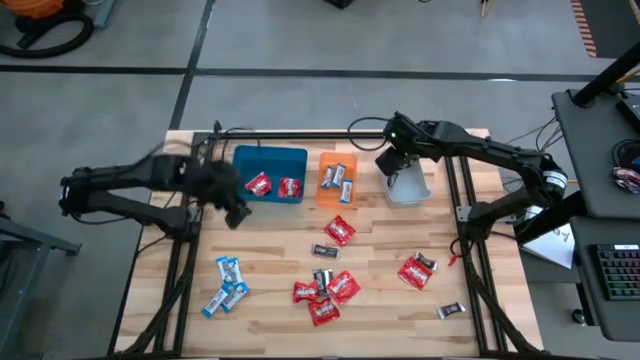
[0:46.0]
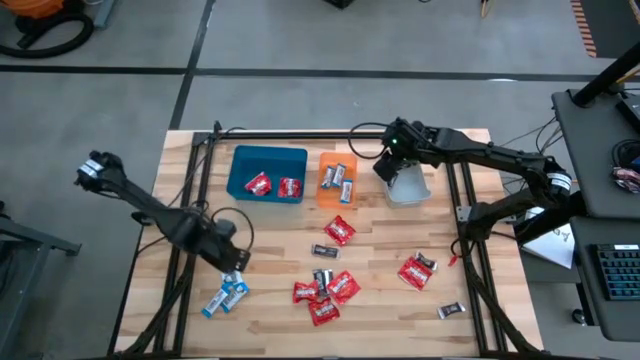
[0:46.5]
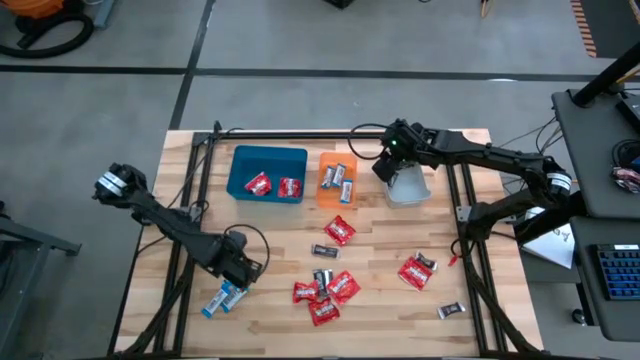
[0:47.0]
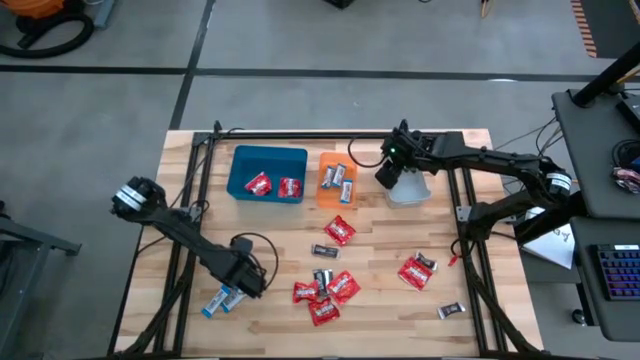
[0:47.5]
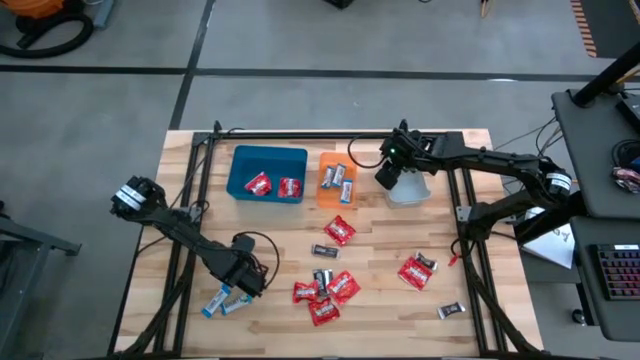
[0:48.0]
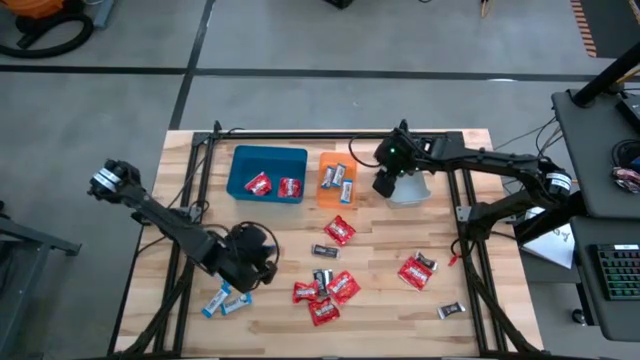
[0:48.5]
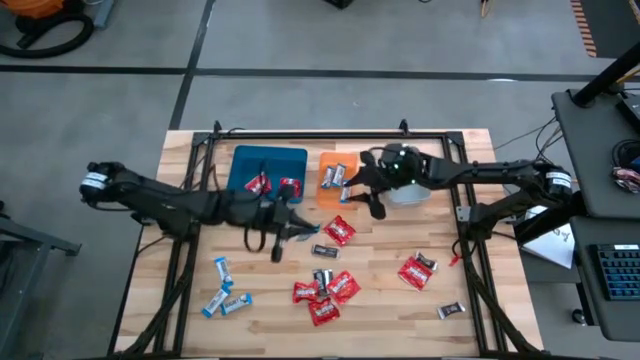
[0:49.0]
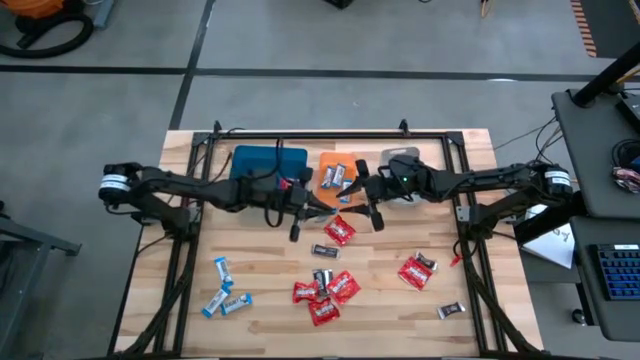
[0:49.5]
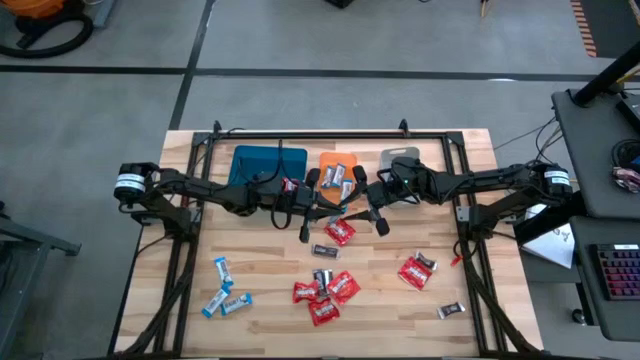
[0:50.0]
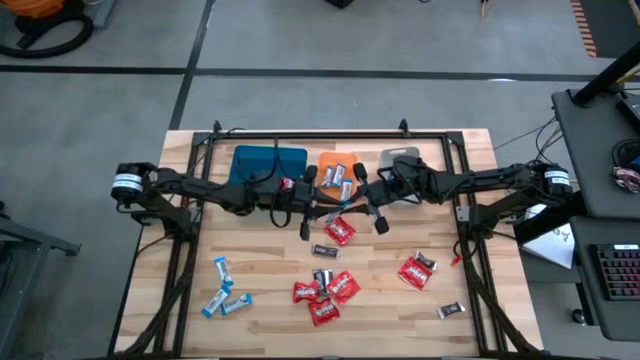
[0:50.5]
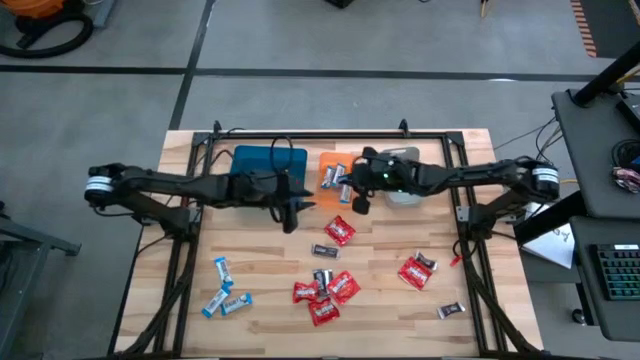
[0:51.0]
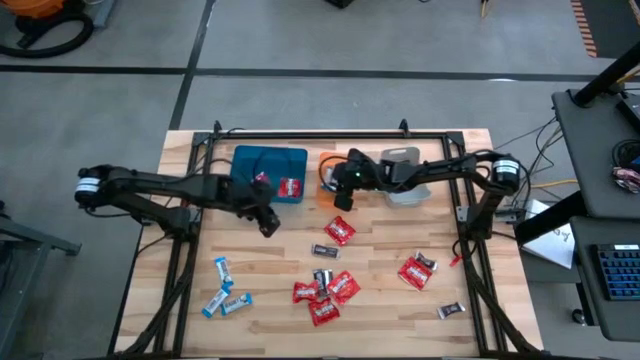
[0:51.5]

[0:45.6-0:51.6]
Task: Sort candy
Put the white chocolate bar into the orange bin

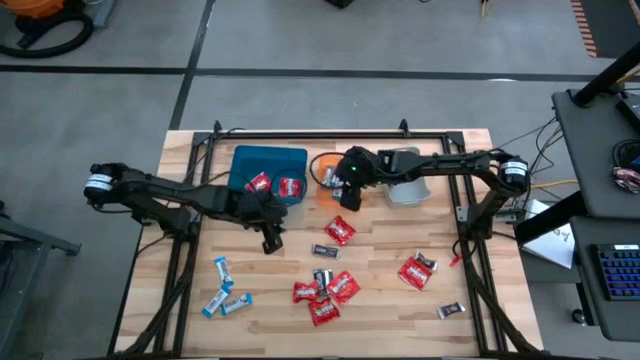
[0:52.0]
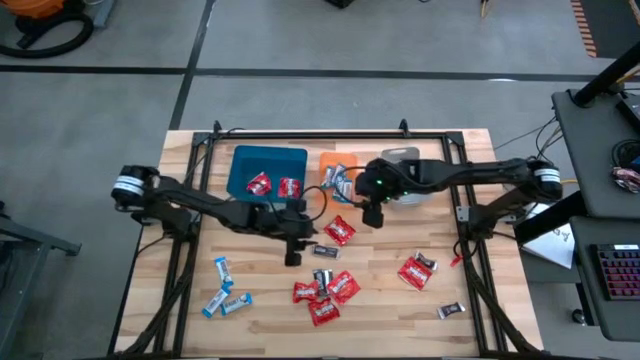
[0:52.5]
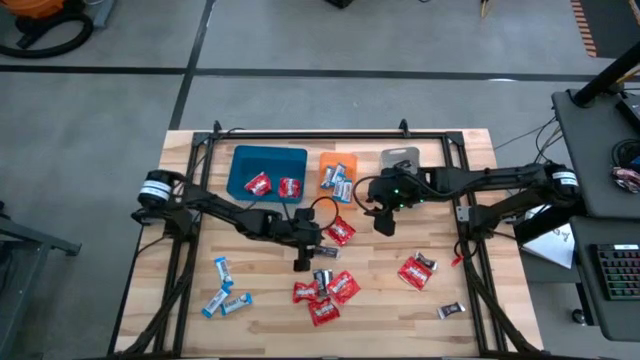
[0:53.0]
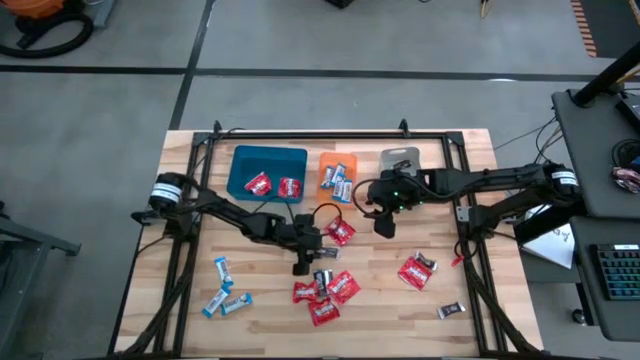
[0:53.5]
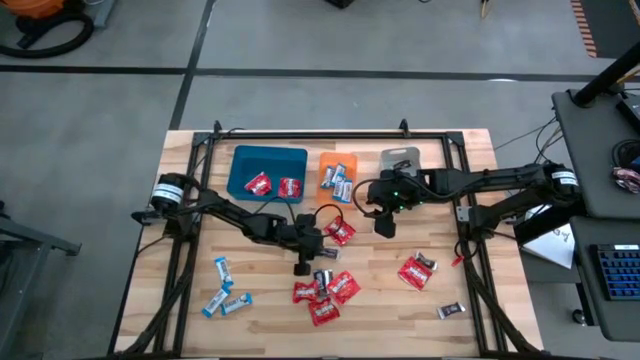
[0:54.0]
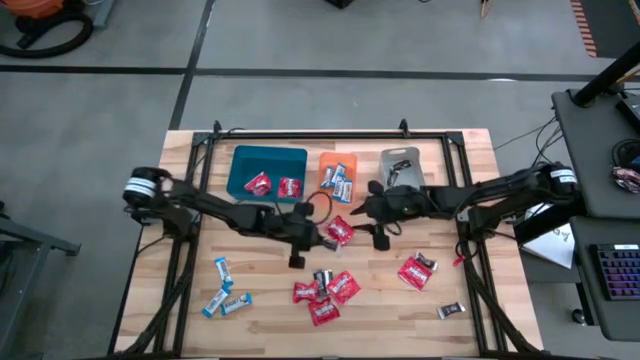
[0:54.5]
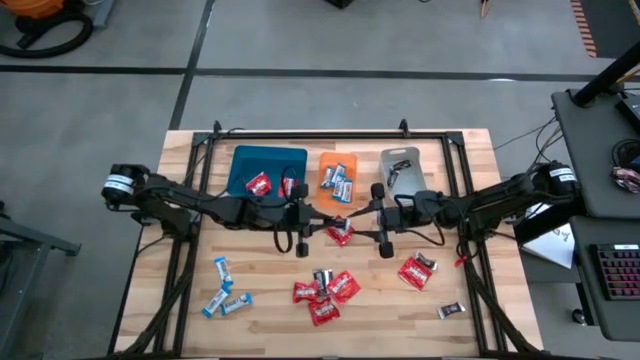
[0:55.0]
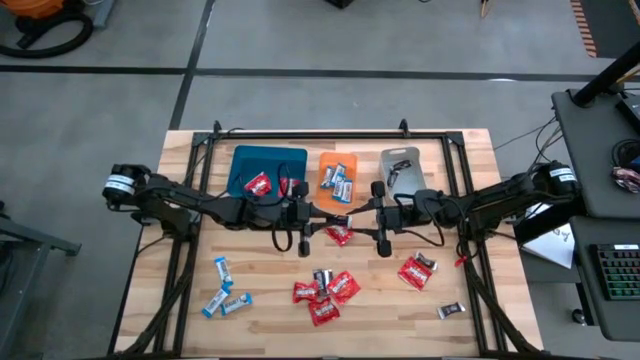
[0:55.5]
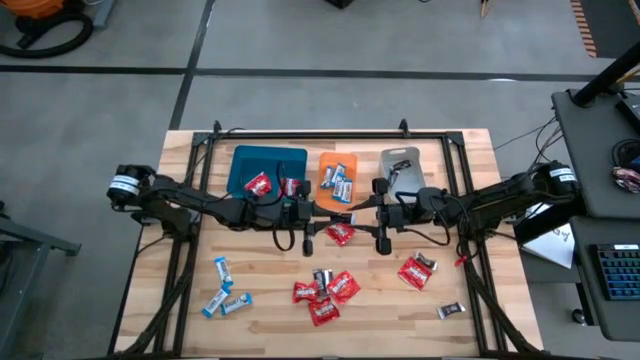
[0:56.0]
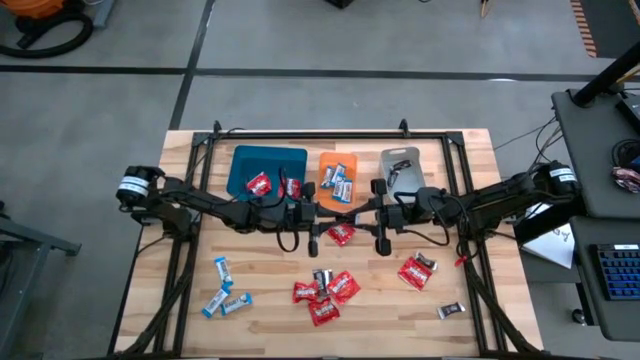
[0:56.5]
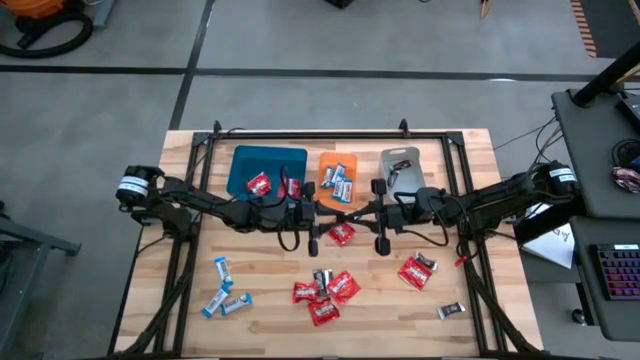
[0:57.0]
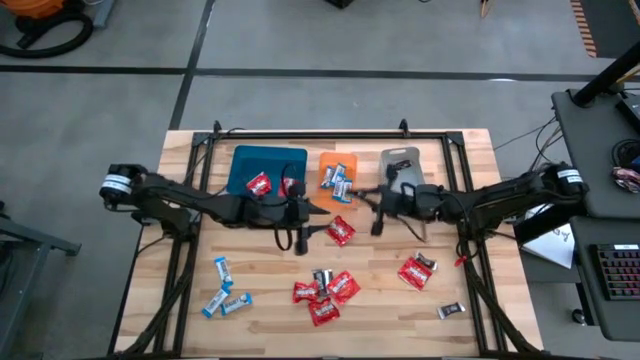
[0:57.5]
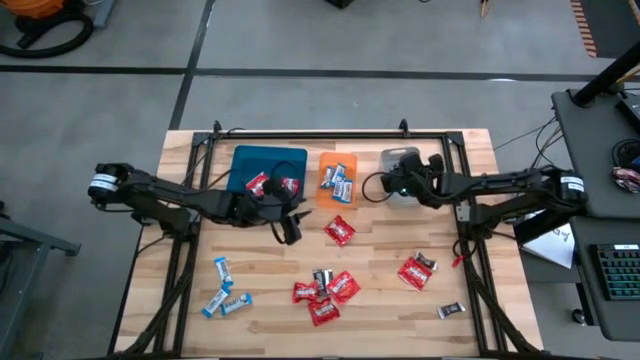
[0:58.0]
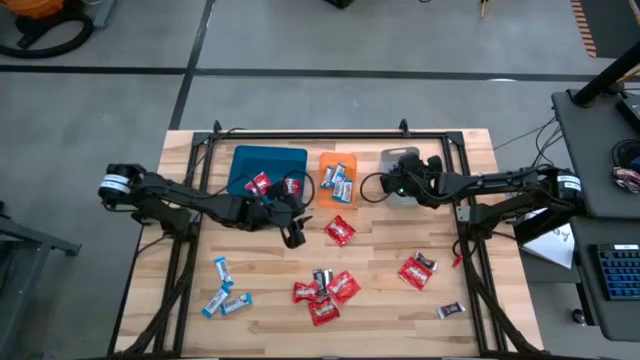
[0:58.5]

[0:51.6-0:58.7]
Put the brown chocolate bar into the gray bin

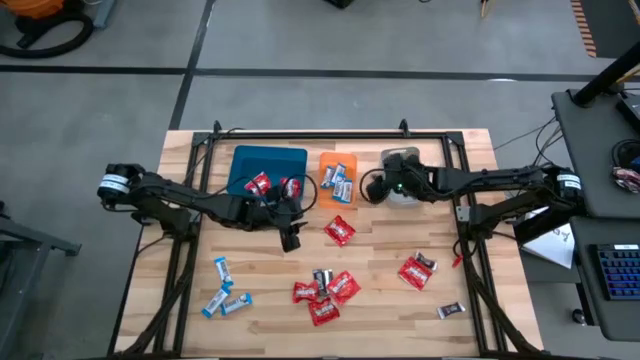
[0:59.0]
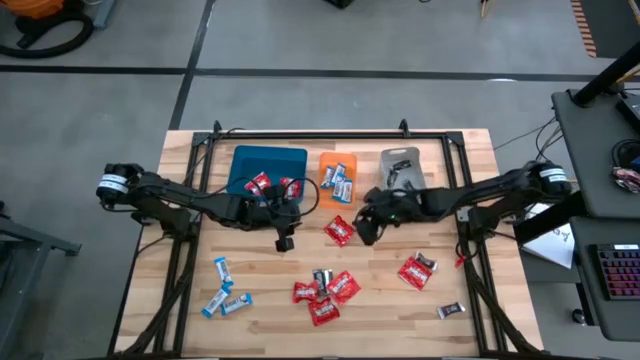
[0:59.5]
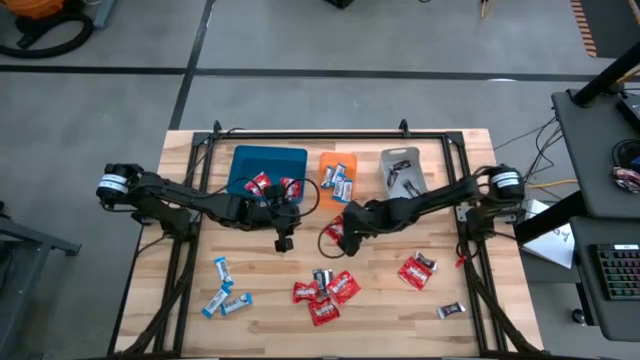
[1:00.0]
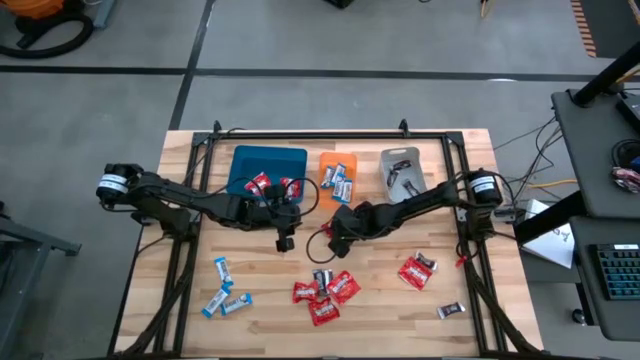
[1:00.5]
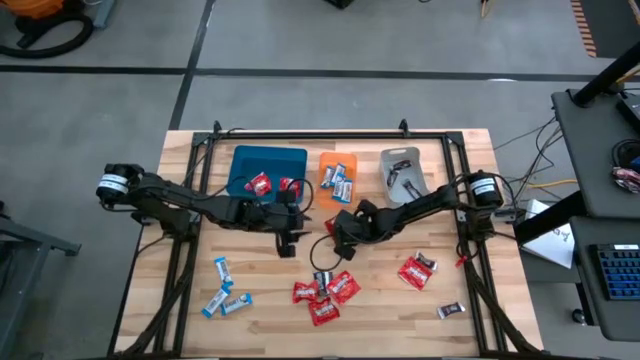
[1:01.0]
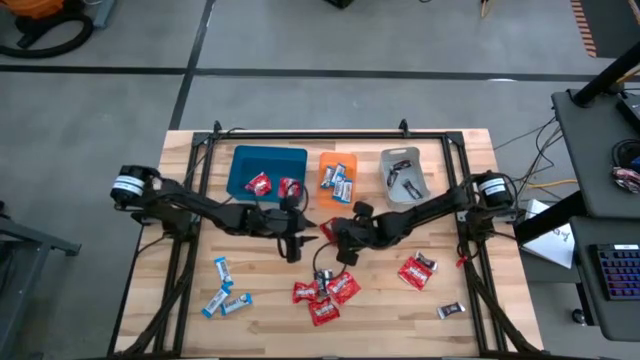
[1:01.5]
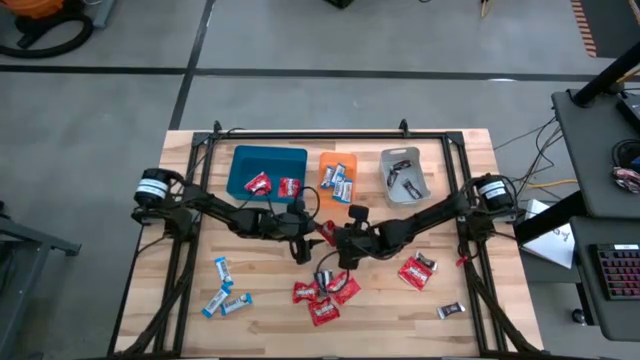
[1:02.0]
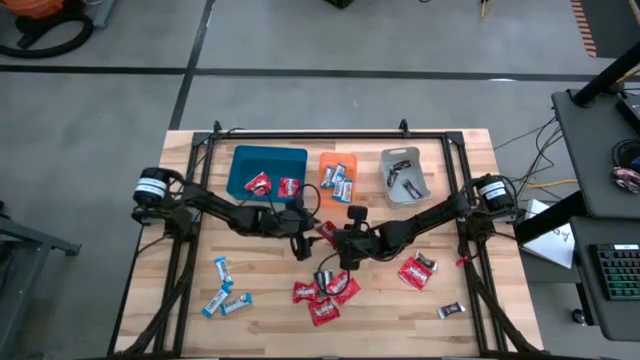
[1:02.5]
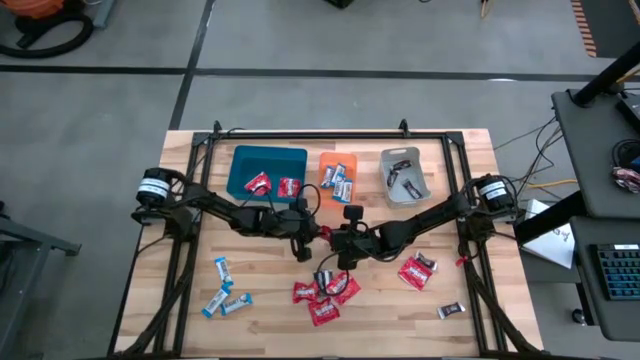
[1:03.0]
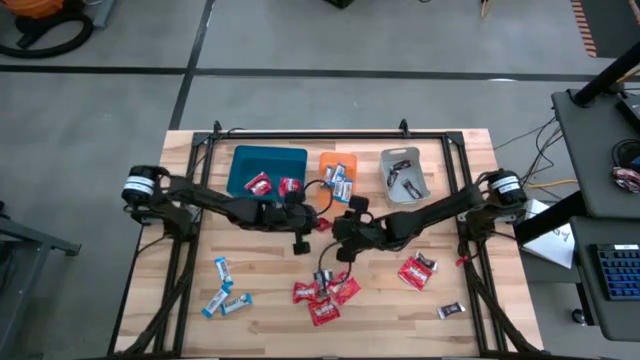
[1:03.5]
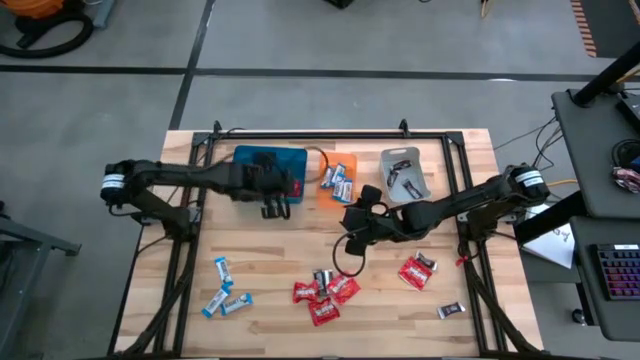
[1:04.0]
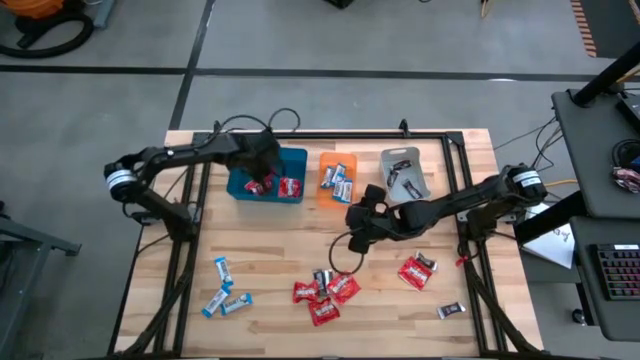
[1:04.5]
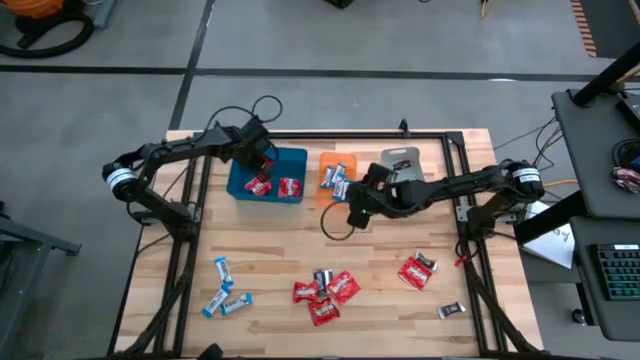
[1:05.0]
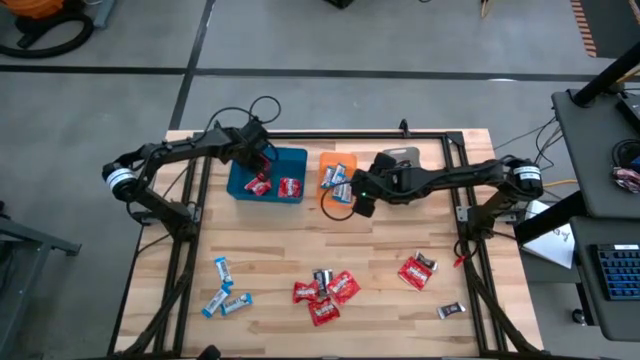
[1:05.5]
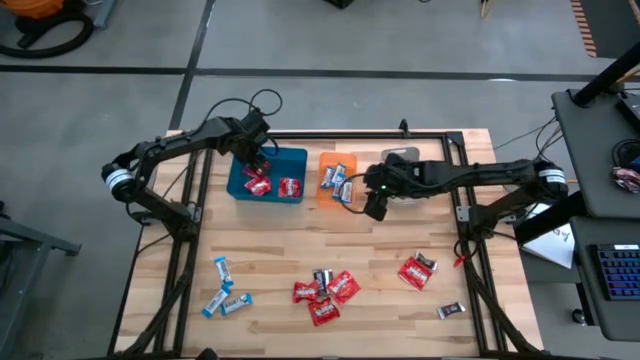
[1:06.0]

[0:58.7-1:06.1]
Put the red candy into the blue bin

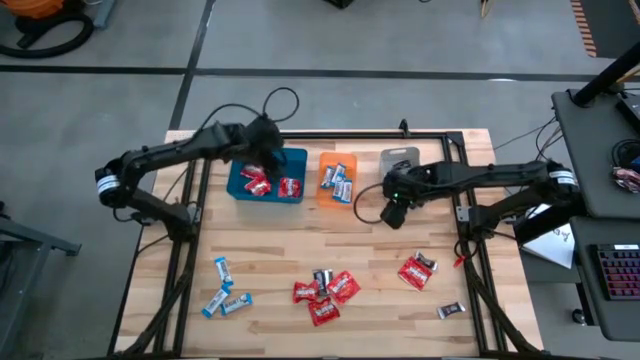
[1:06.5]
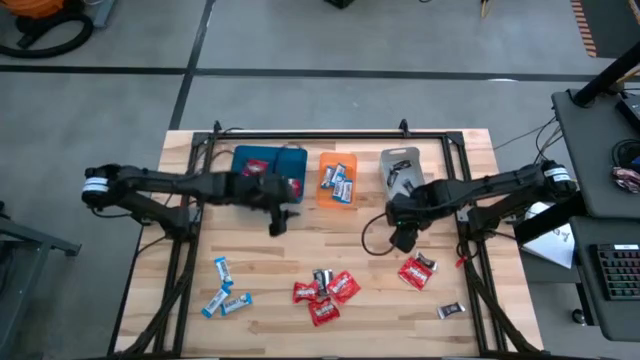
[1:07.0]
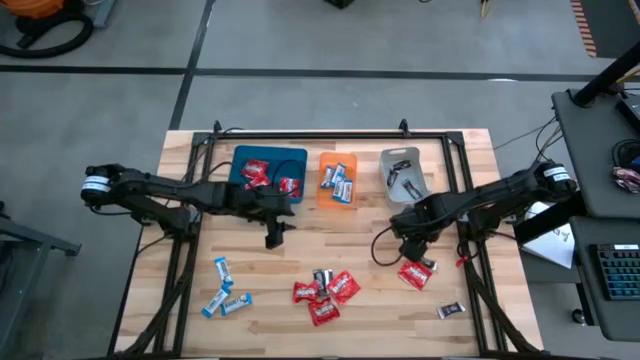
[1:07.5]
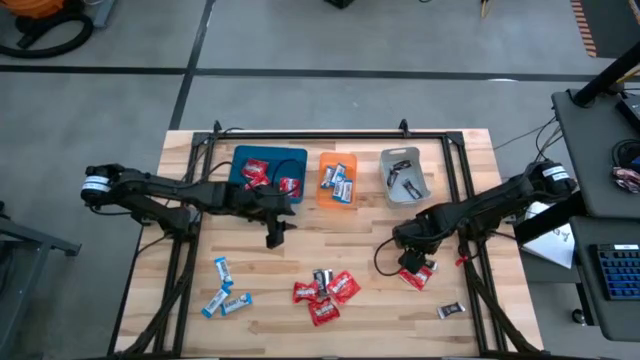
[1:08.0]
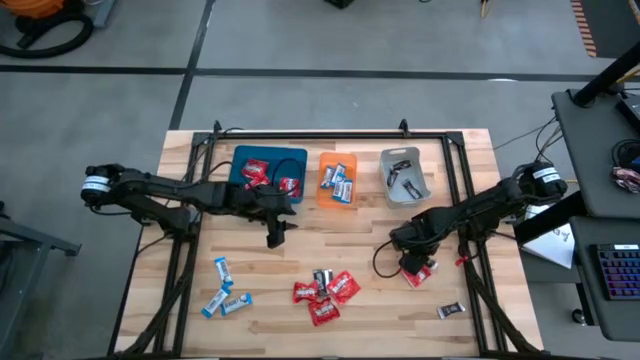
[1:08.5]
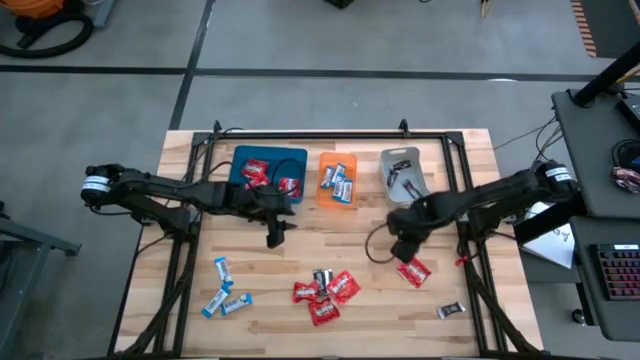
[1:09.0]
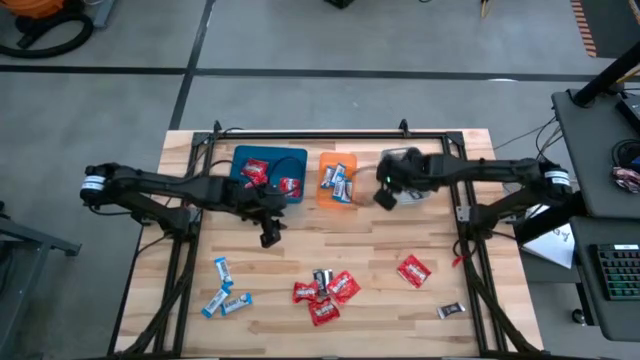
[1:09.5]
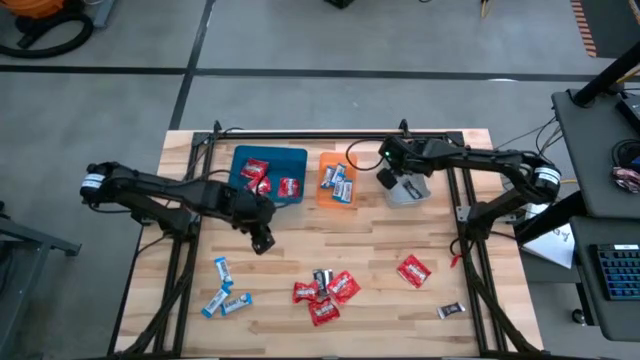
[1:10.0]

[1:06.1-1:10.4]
Put the brown chocolate bar into the gray bin
